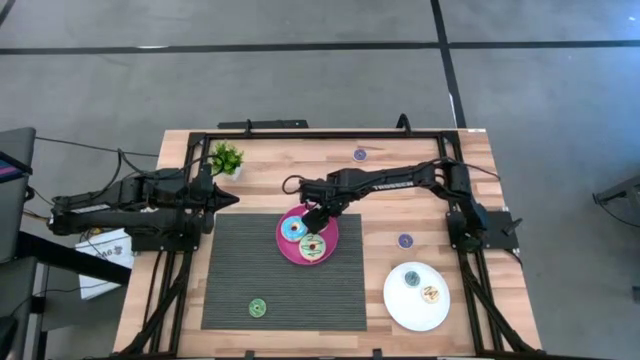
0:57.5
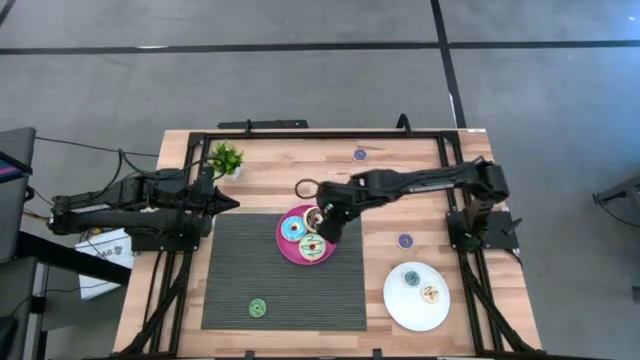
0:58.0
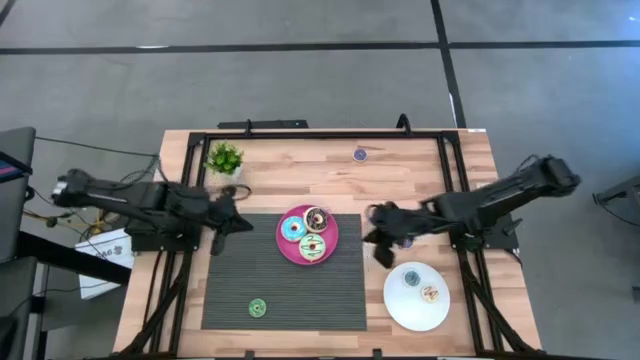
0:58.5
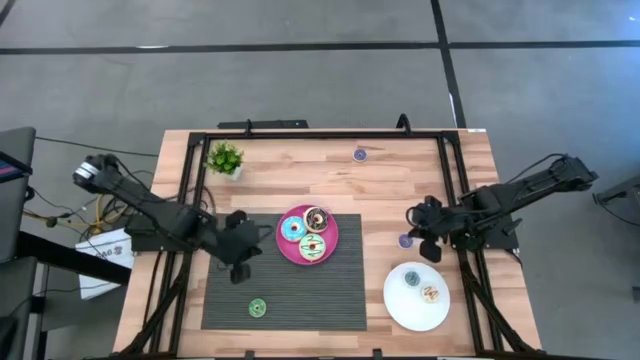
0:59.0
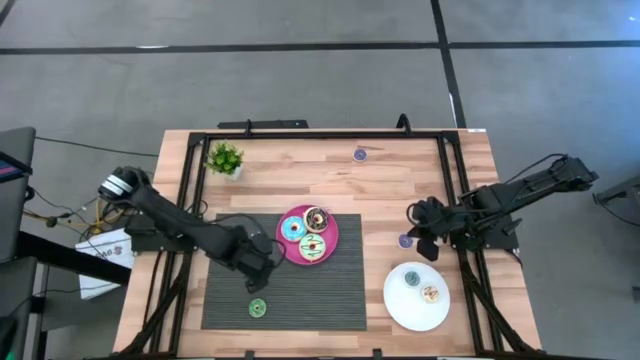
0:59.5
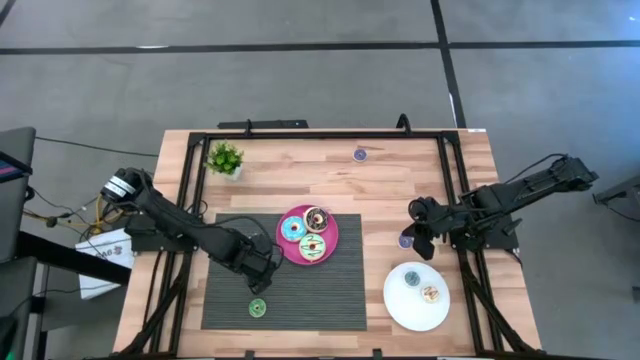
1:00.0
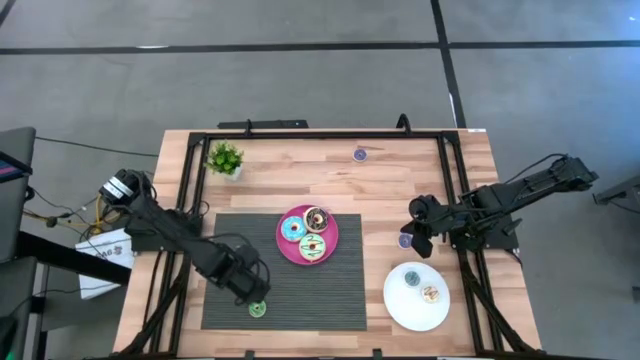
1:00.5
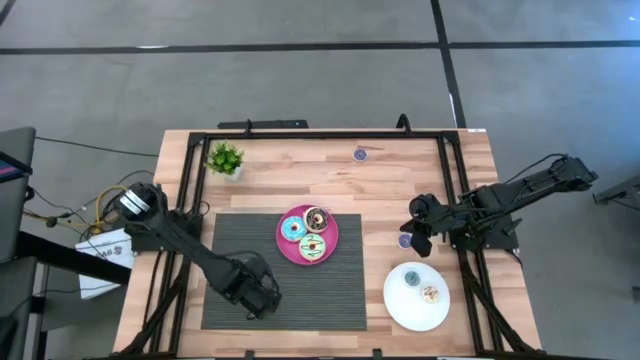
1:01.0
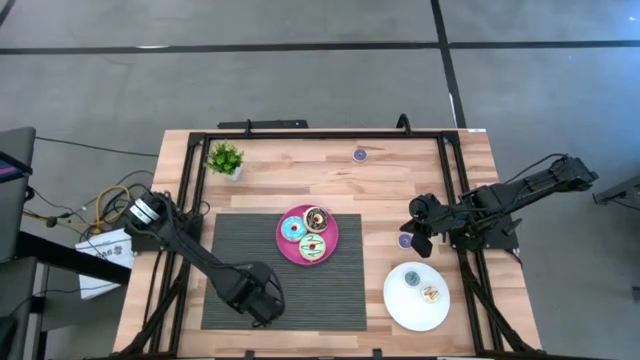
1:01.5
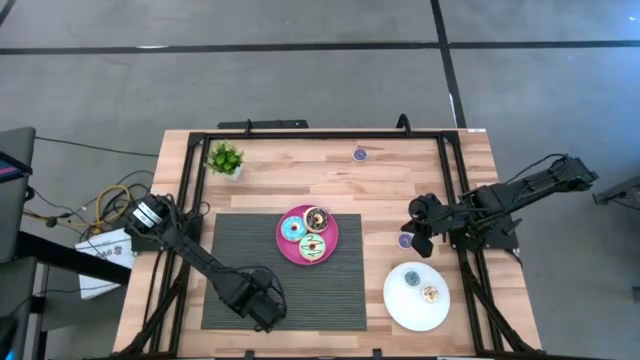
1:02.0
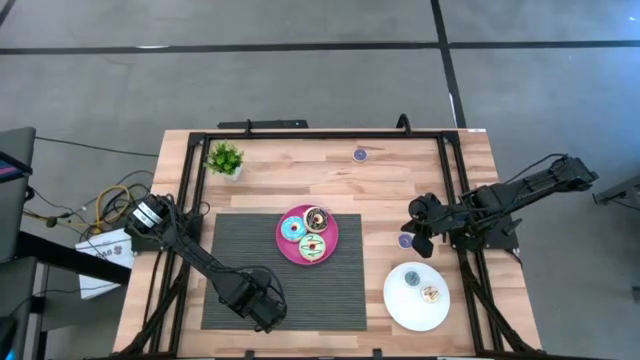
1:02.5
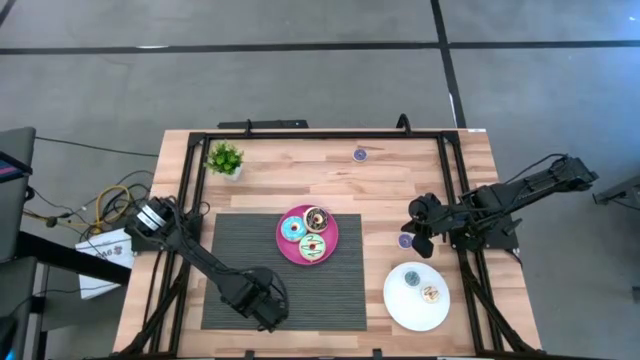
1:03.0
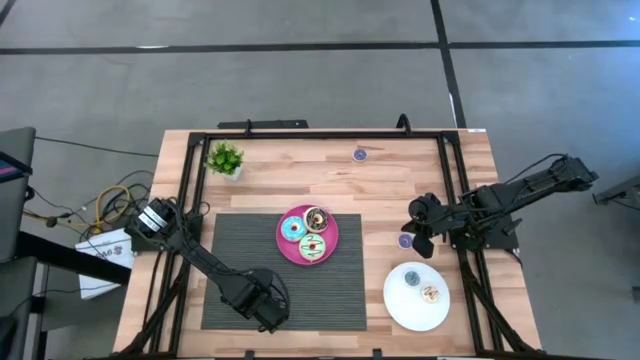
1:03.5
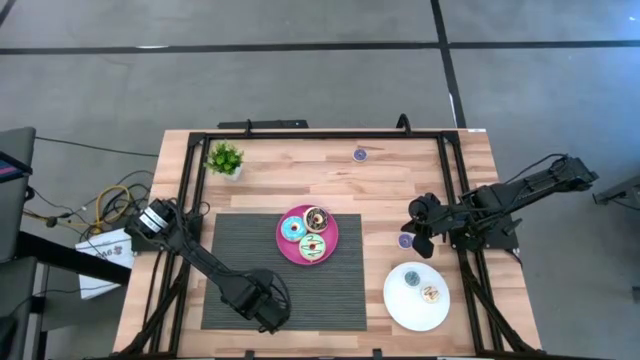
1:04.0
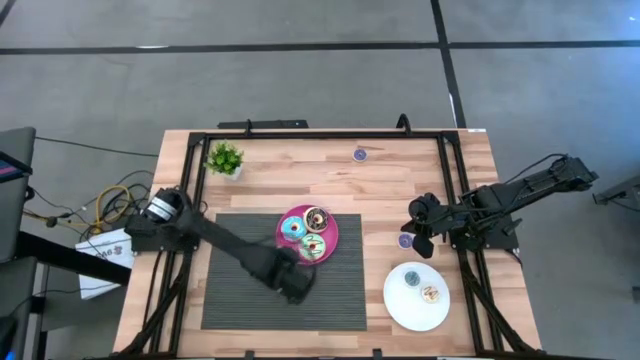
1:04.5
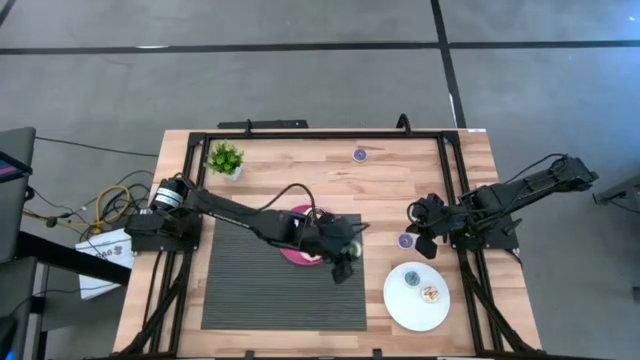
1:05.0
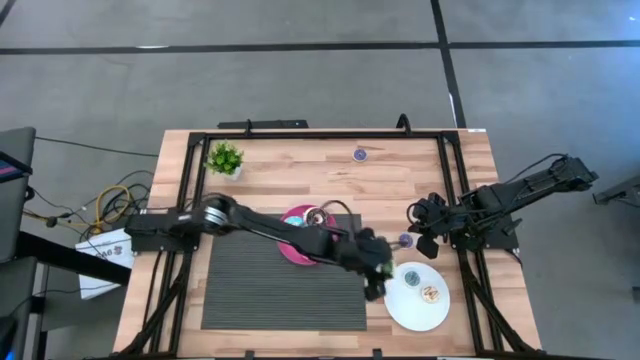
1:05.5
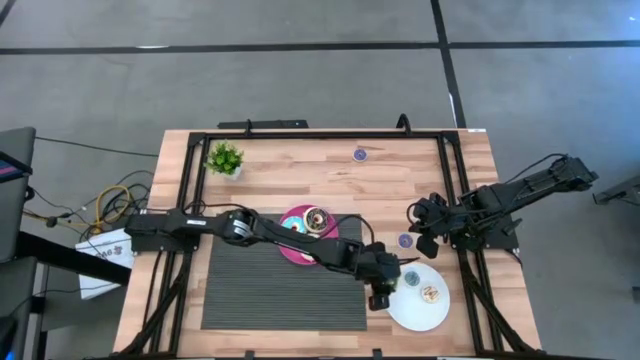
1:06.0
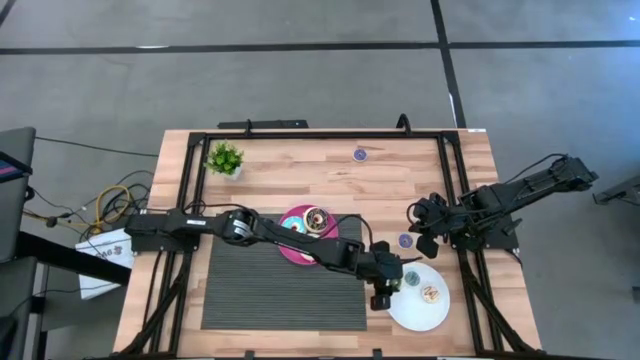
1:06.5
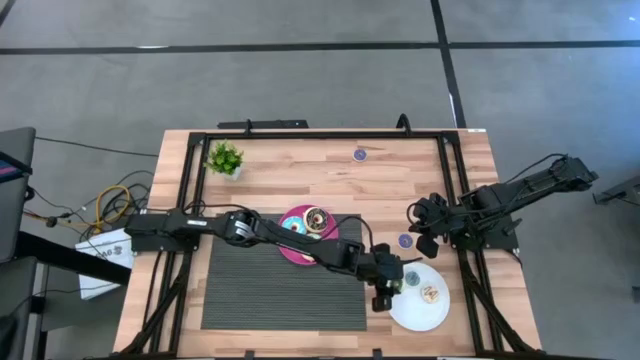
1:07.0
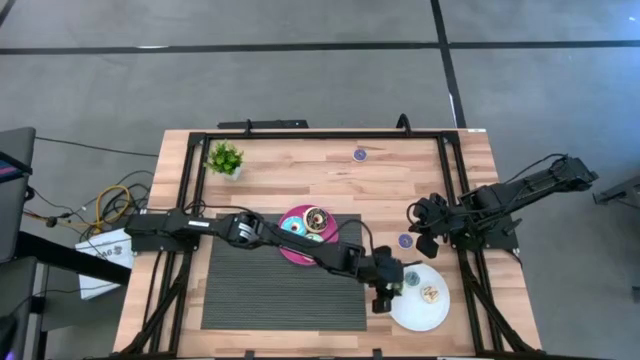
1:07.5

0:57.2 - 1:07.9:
Task: Pick & Place donuts
Put the small green donut on the white plate

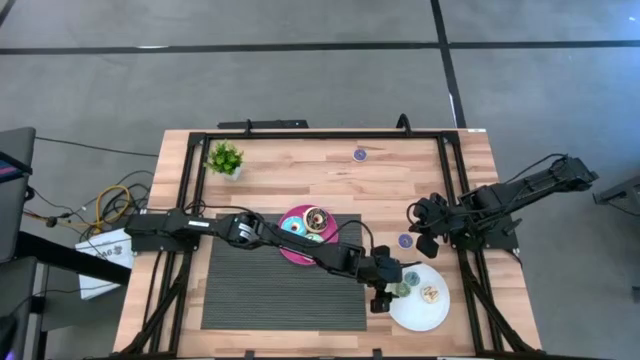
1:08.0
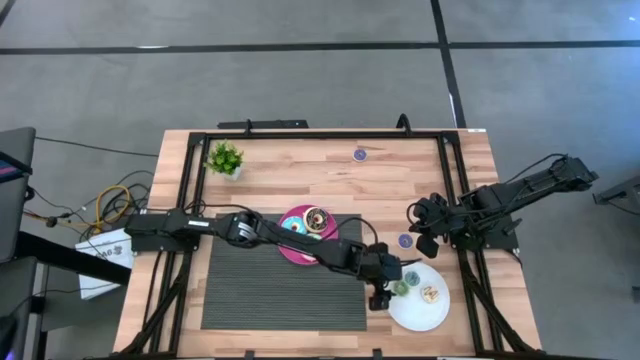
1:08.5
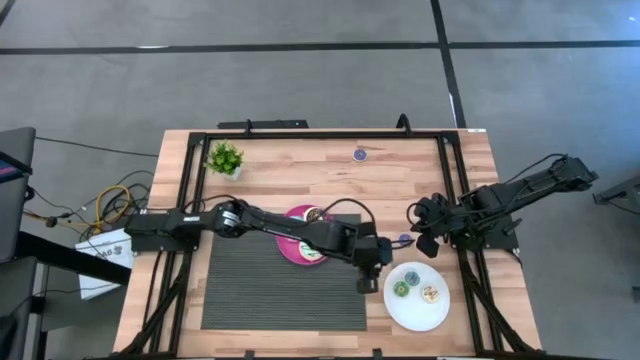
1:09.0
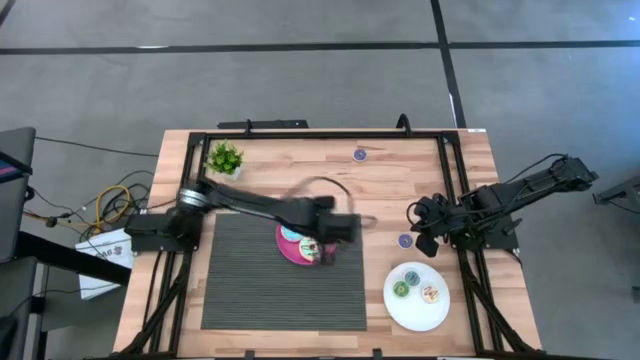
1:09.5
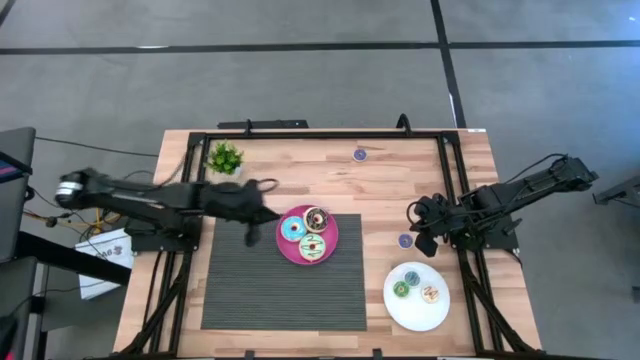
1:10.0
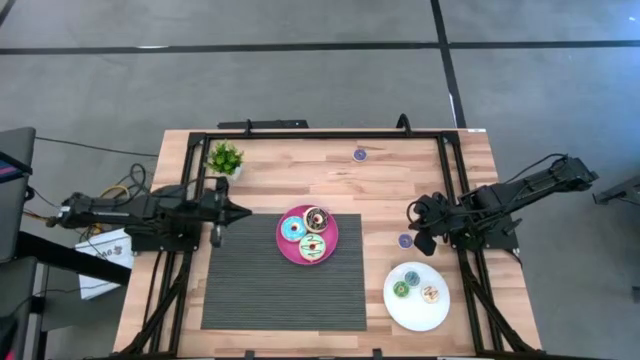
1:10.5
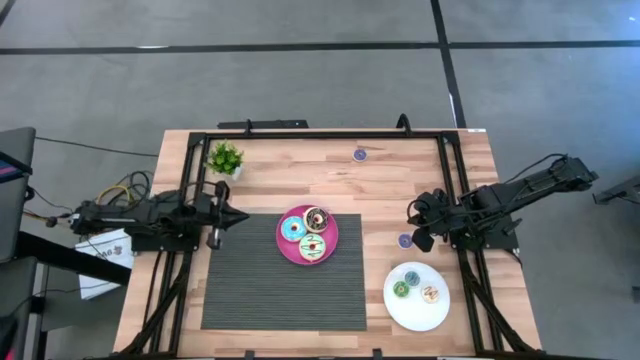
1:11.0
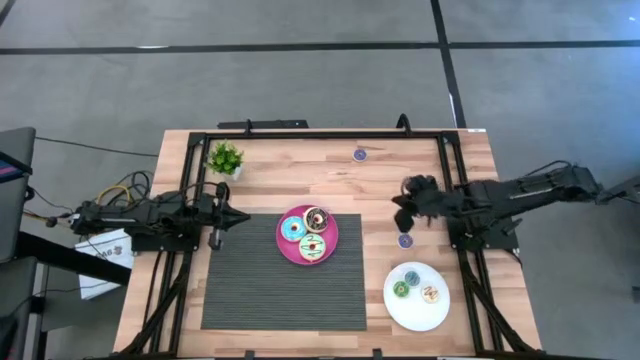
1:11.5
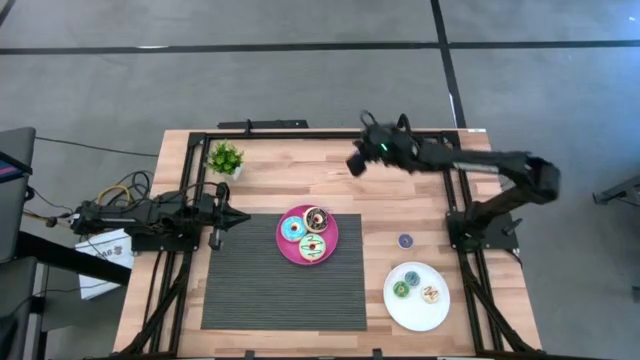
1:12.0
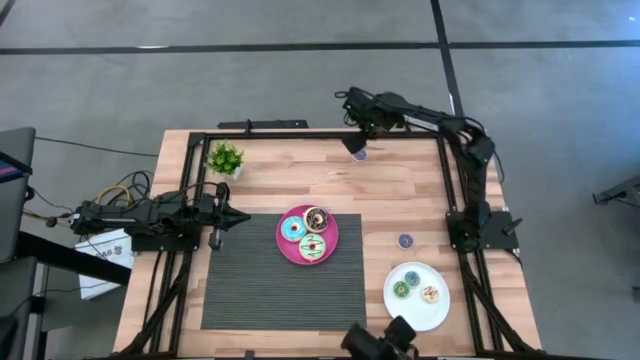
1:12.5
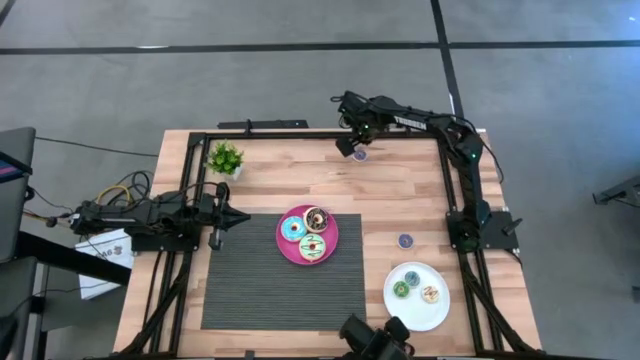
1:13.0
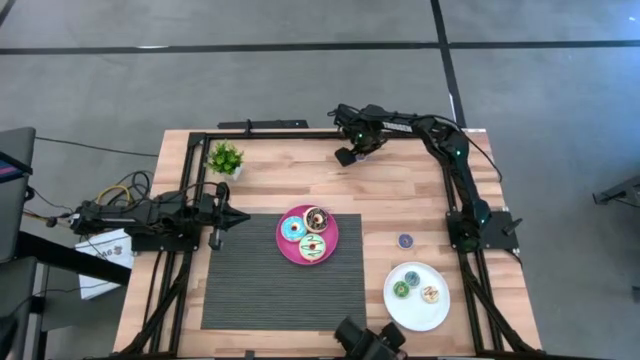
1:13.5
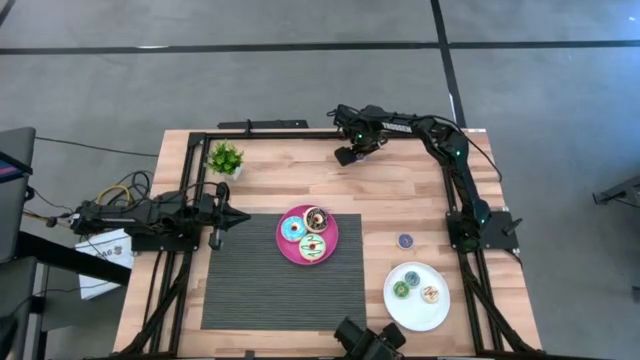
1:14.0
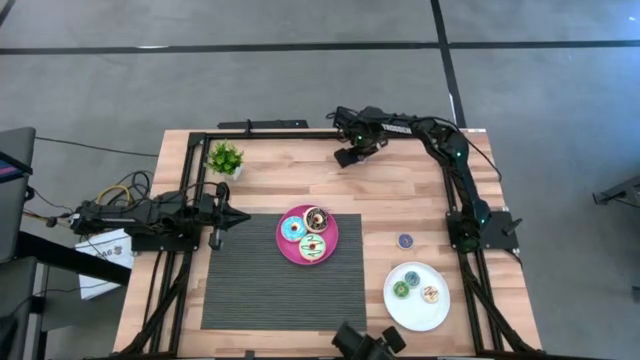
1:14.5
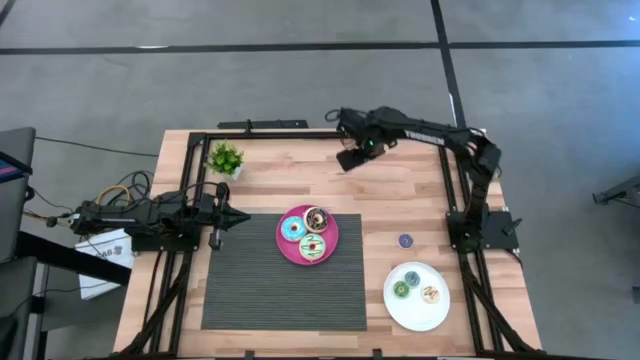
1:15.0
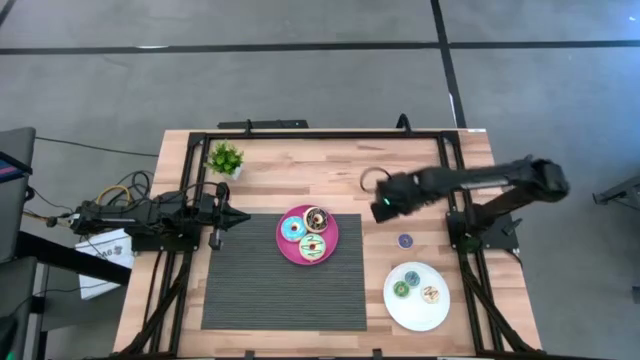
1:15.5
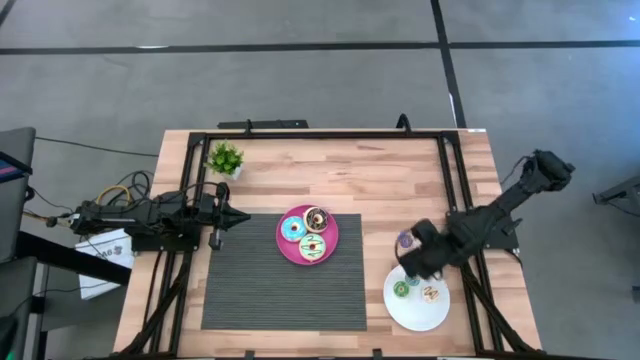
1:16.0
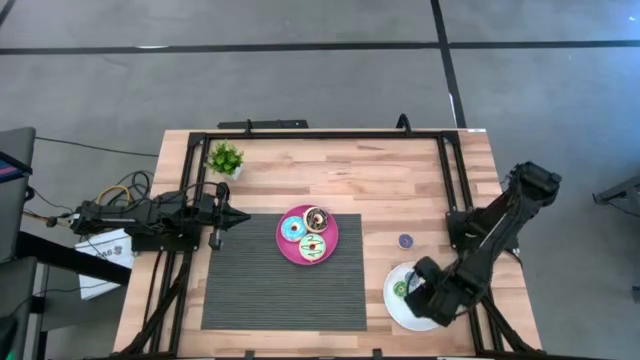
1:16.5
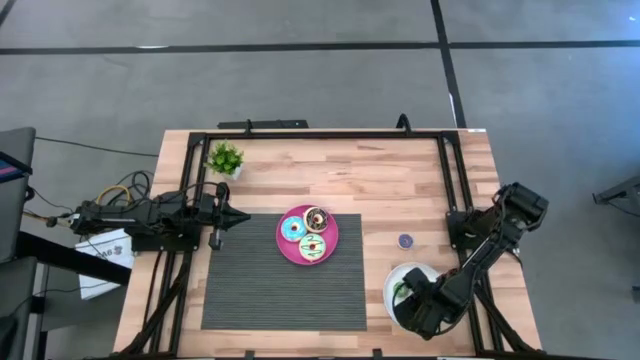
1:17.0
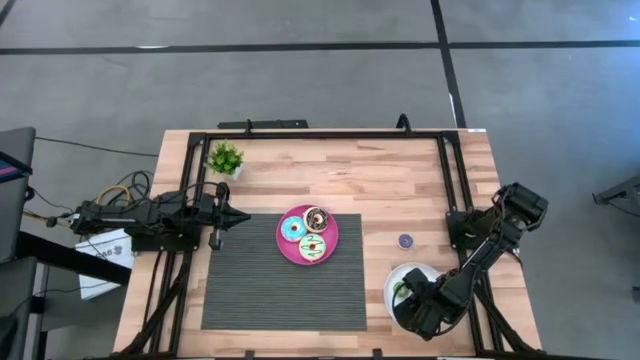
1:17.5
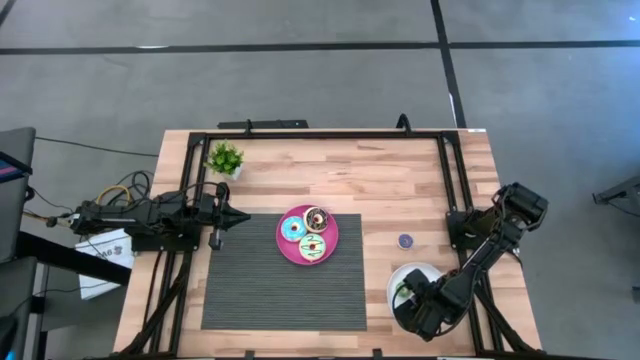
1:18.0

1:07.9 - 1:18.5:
Put the top small dark blue donut on the white plate
